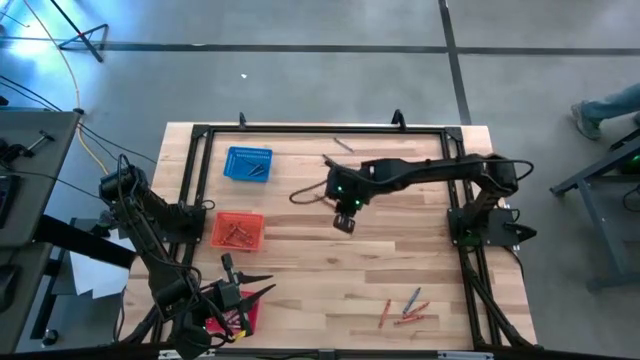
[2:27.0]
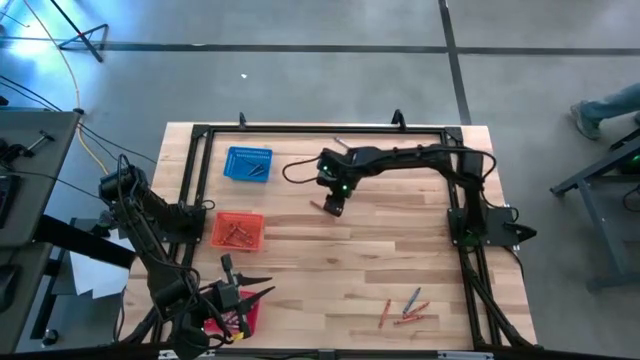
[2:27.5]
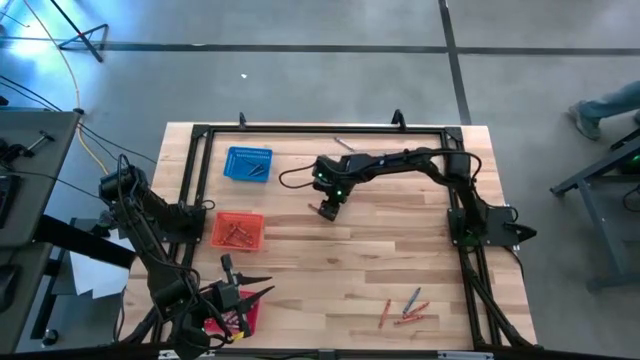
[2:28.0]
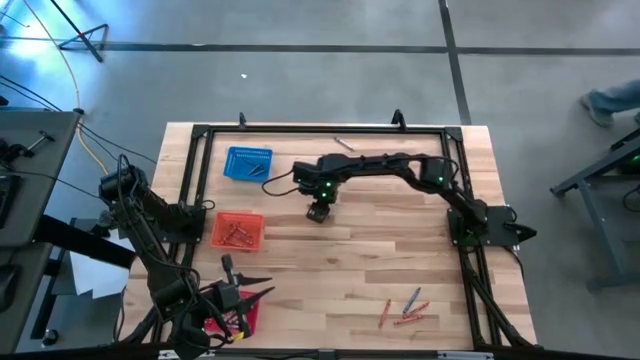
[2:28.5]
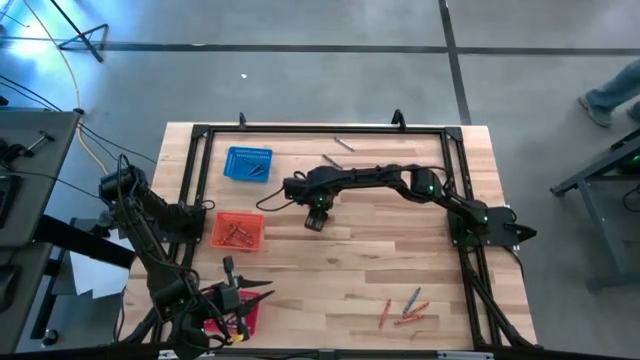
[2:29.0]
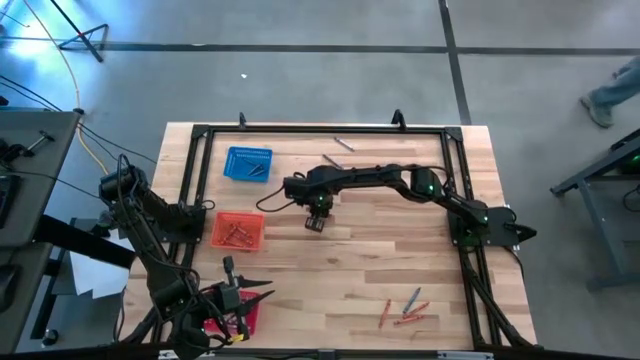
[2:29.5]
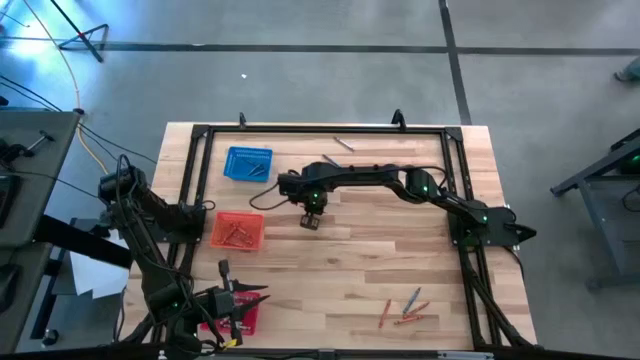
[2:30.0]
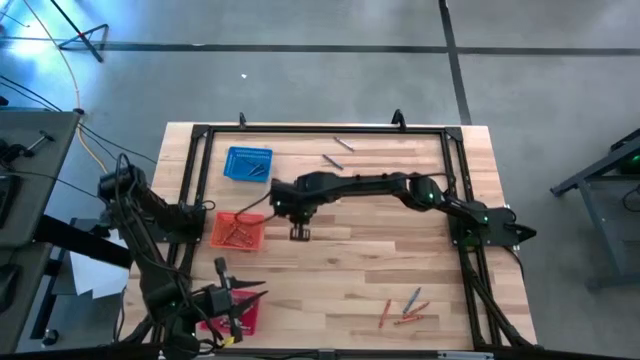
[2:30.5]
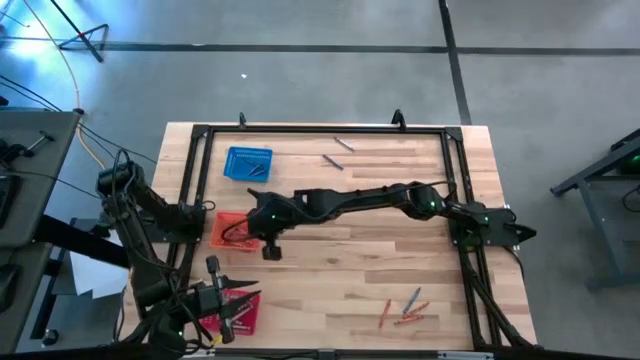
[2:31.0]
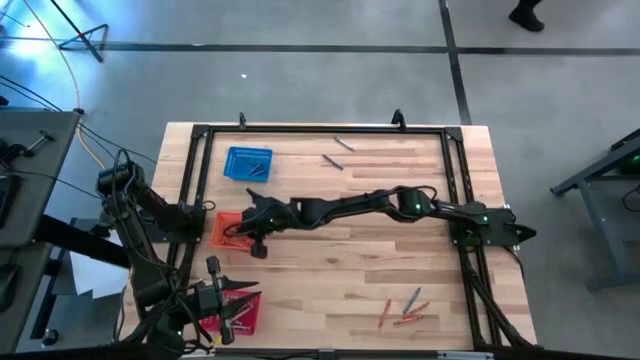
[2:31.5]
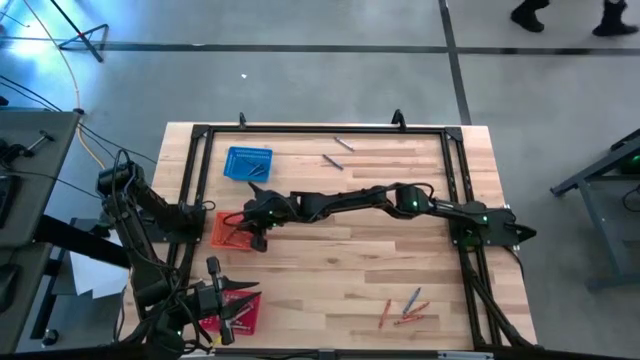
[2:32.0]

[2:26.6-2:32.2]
Task: Sort crayons
Put the orange crayon into the orange bin

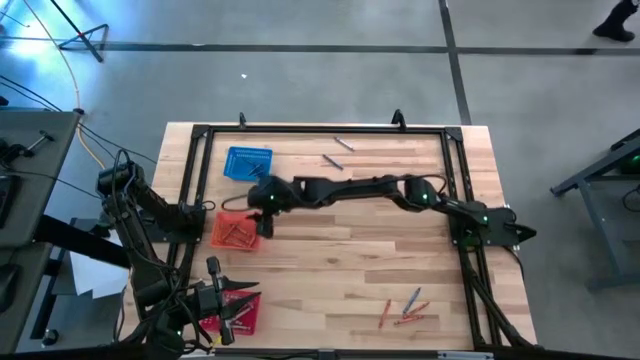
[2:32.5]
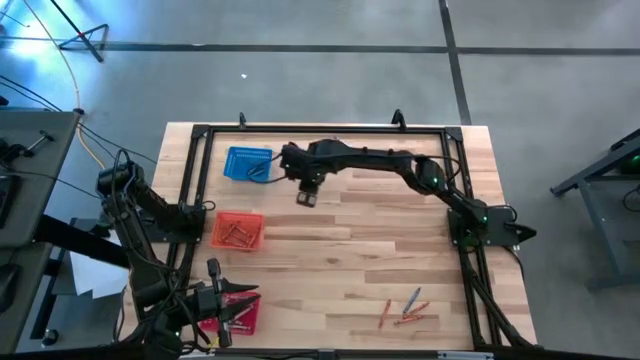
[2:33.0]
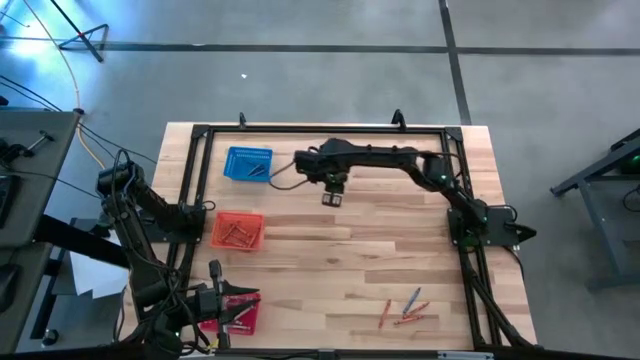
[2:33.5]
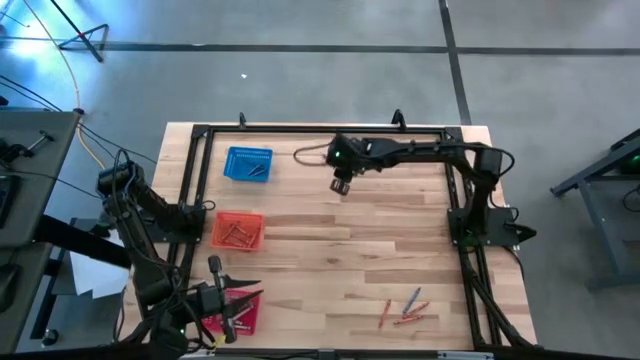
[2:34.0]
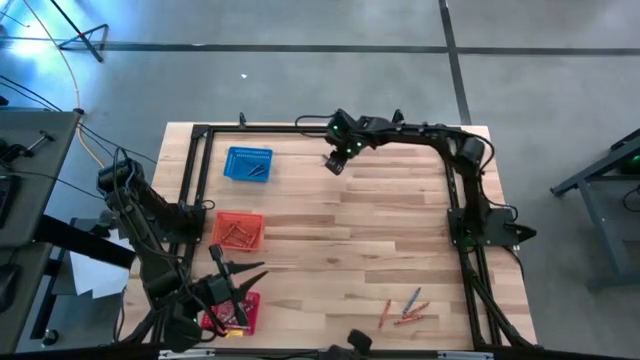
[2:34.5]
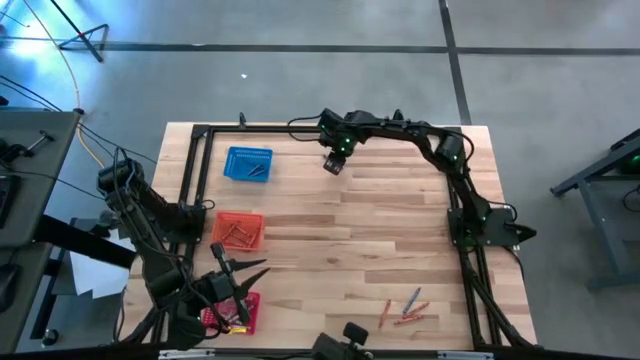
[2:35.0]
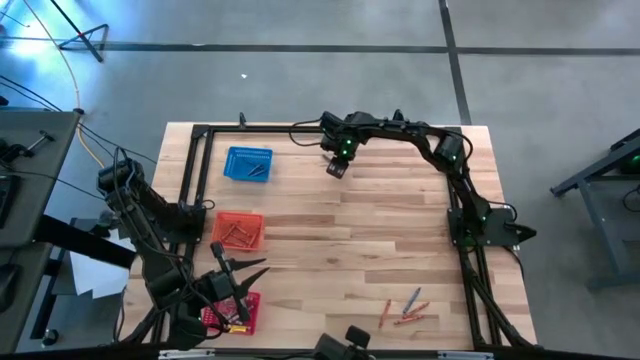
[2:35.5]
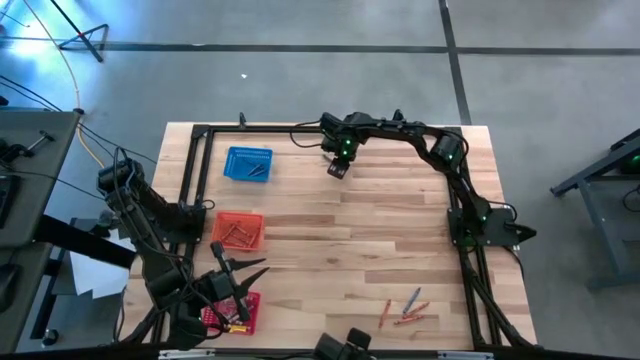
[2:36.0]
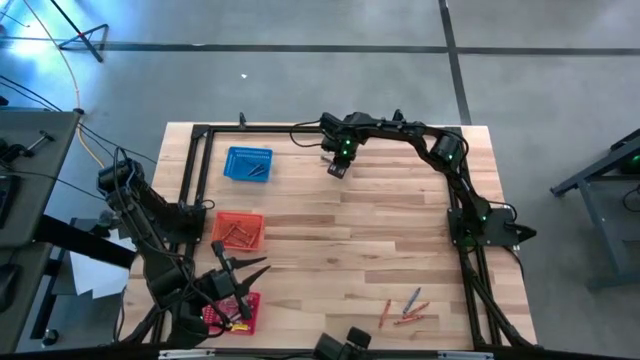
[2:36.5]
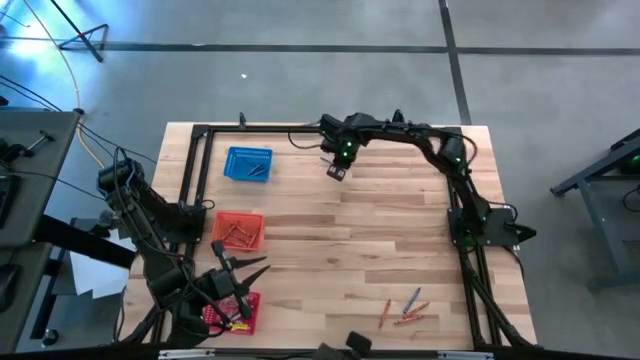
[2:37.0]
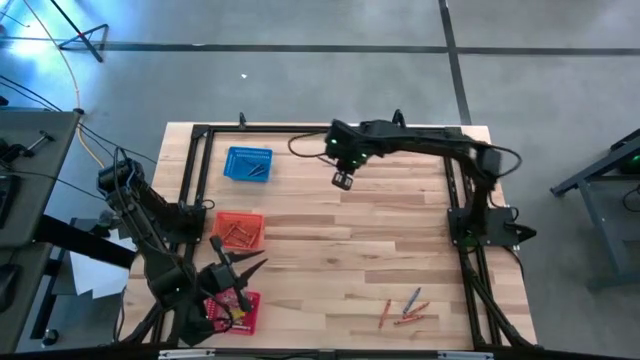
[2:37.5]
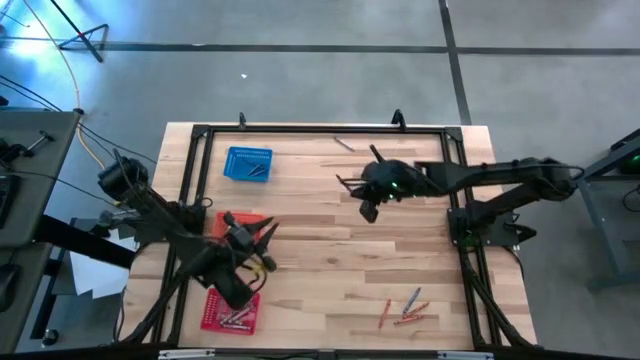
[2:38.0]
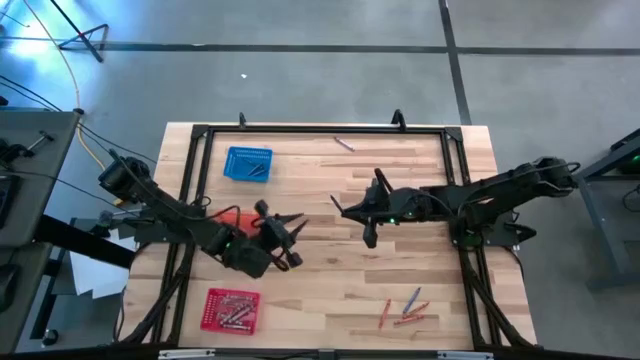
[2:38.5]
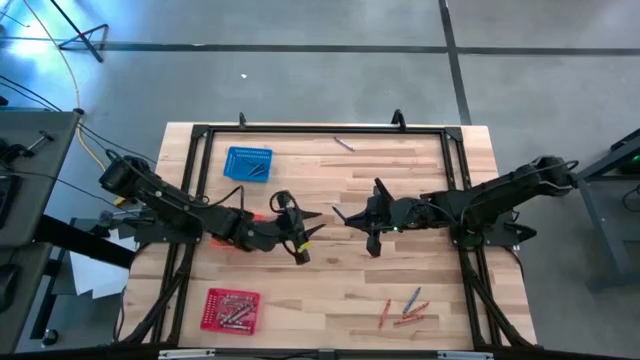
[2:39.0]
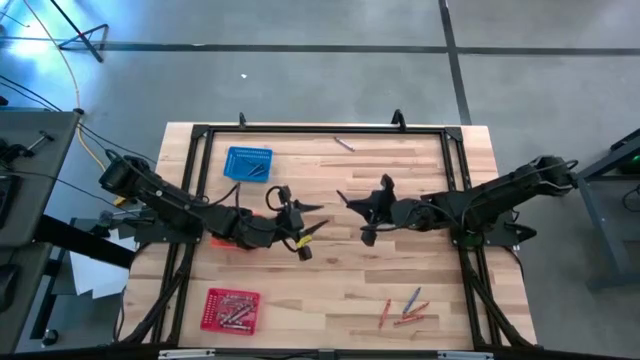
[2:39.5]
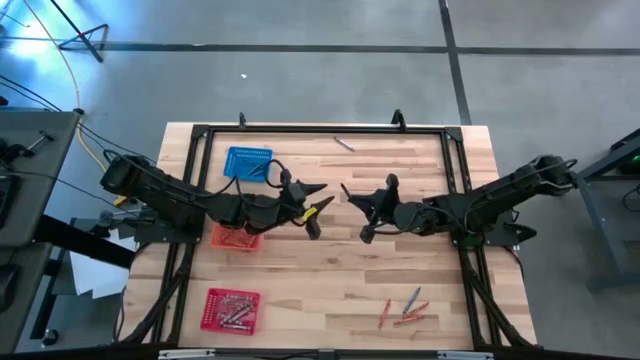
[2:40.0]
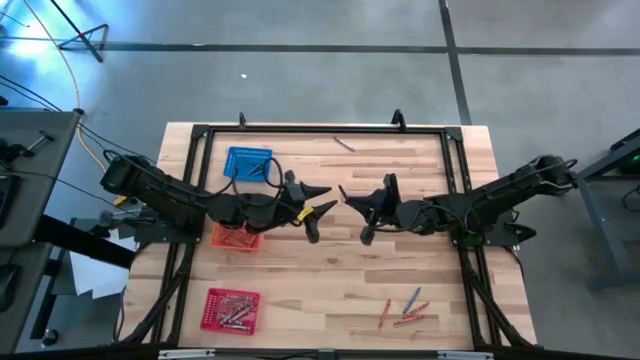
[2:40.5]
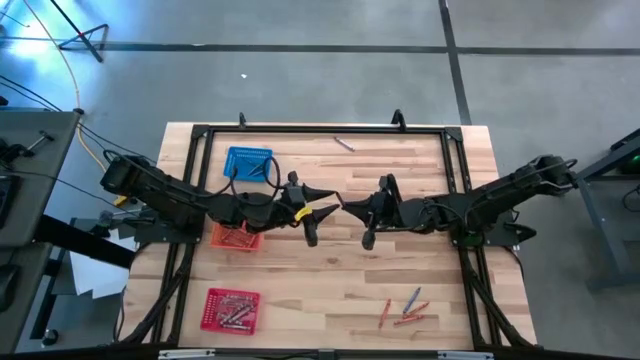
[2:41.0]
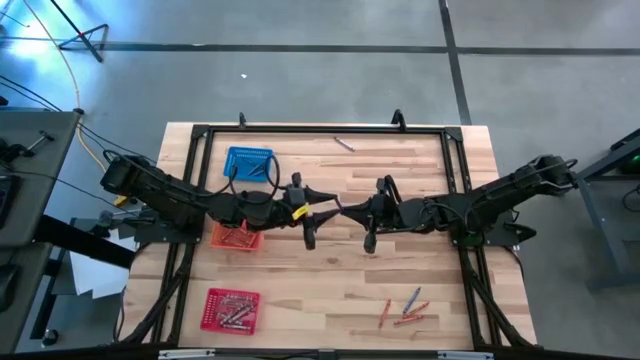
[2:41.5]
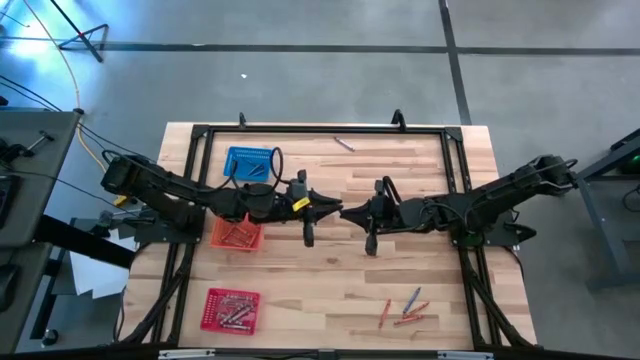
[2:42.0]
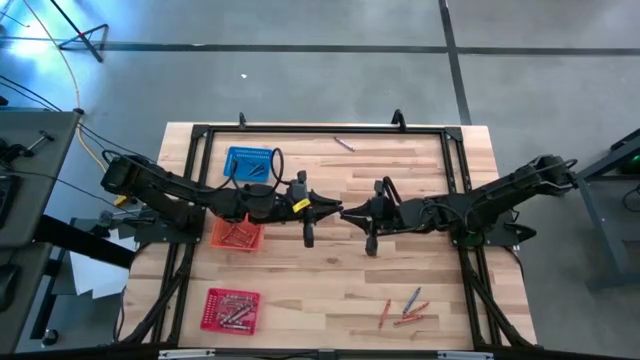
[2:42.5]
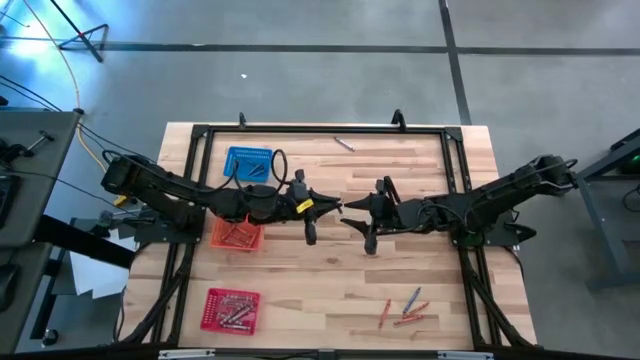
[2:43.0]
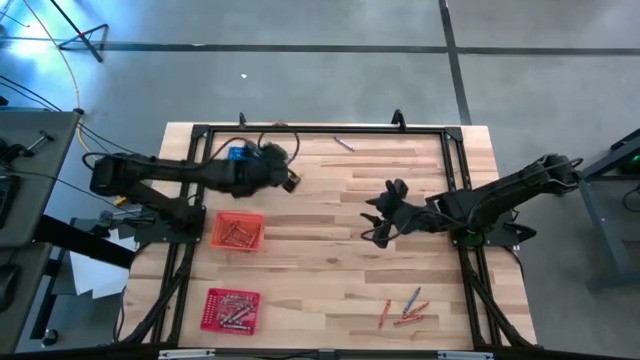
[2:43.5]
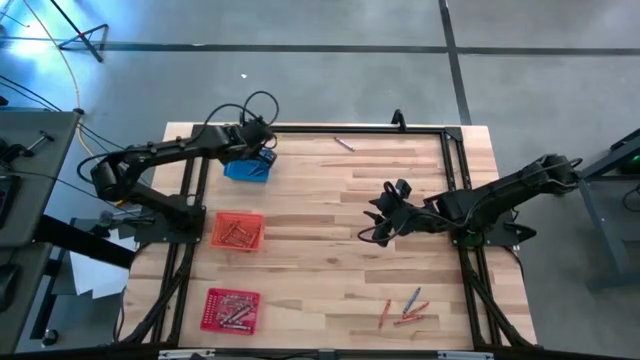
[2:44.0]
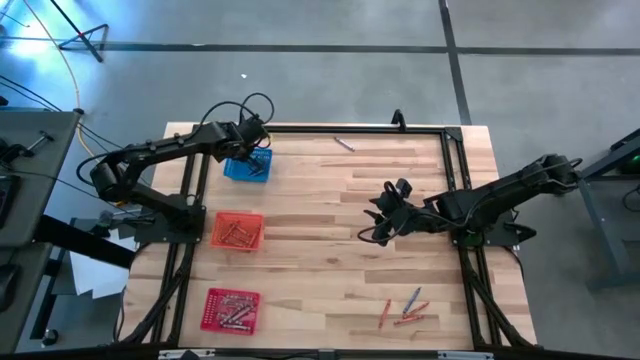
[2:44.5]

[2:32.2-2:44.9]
Put the blue crayon into the blue bin

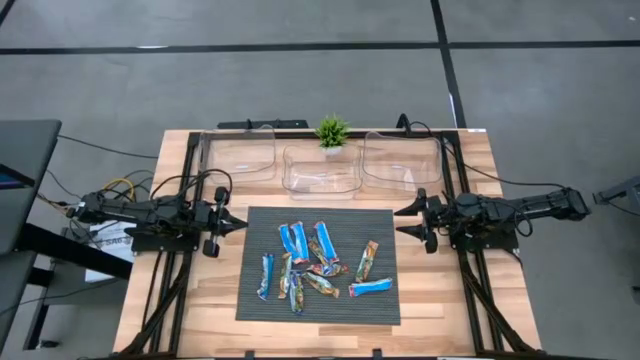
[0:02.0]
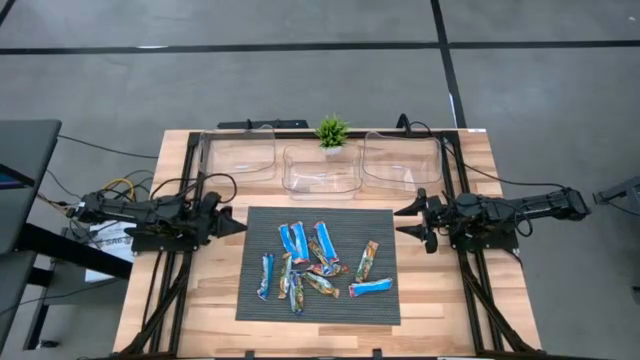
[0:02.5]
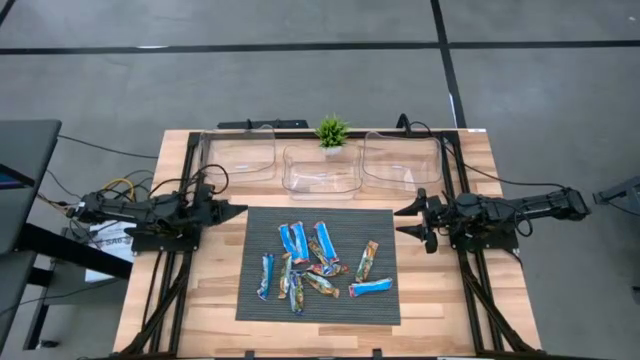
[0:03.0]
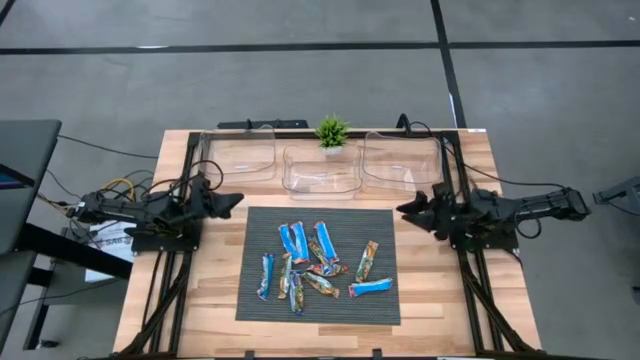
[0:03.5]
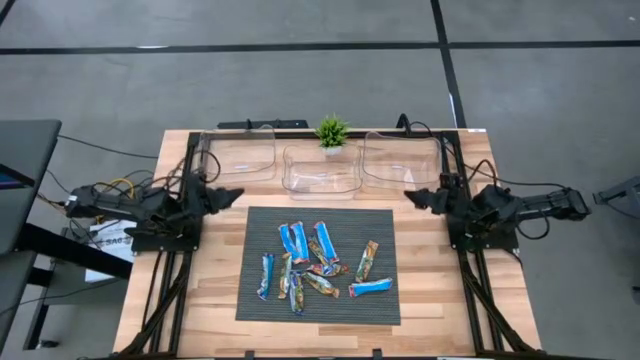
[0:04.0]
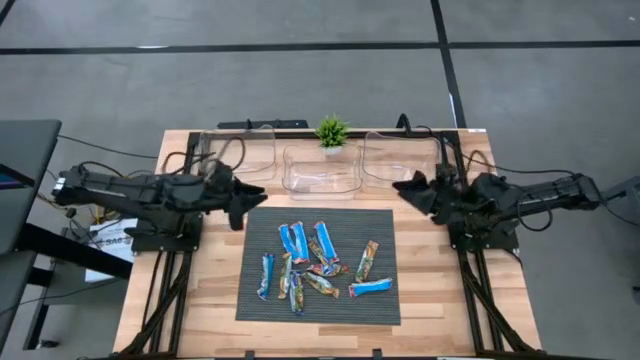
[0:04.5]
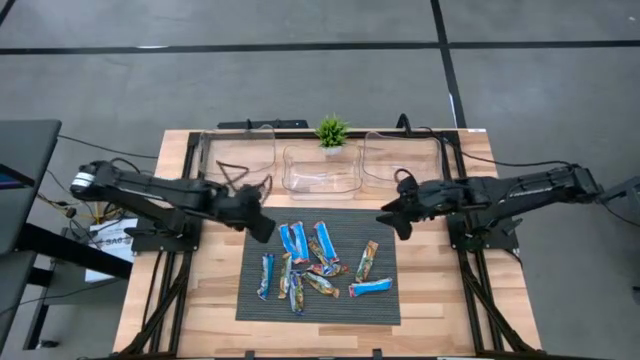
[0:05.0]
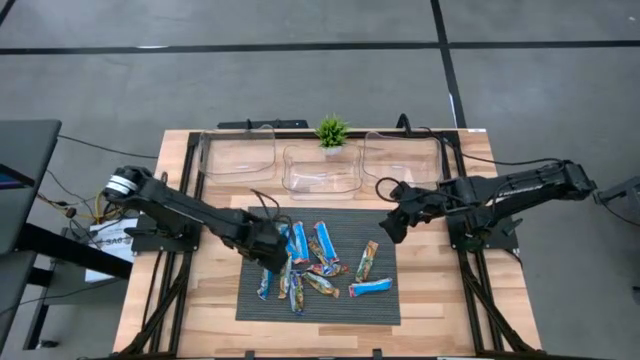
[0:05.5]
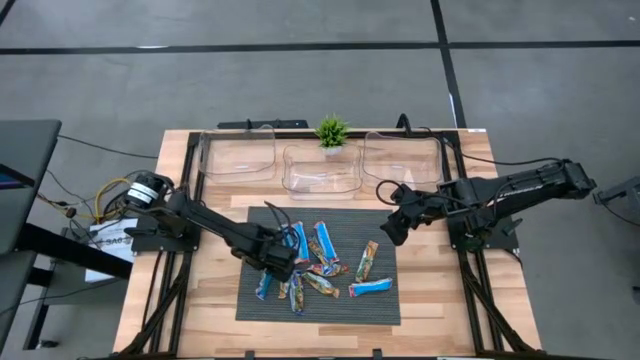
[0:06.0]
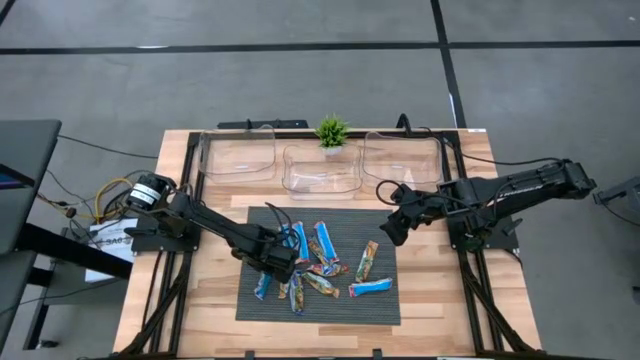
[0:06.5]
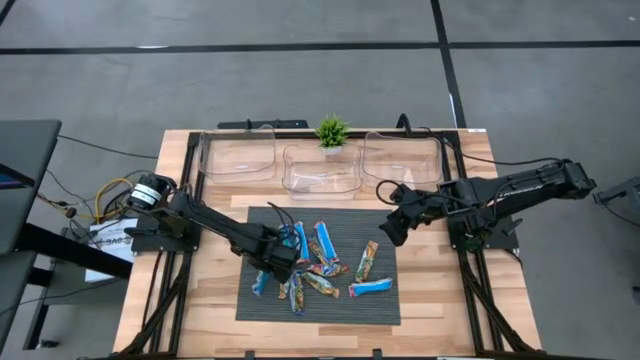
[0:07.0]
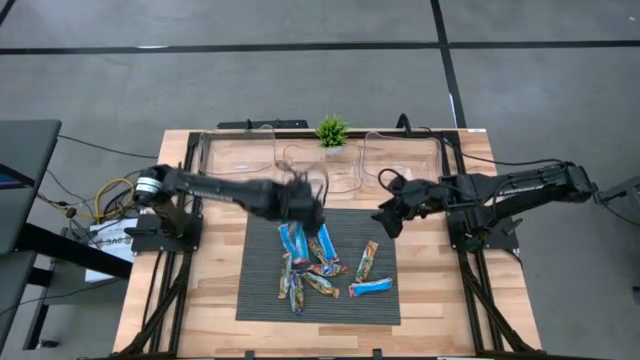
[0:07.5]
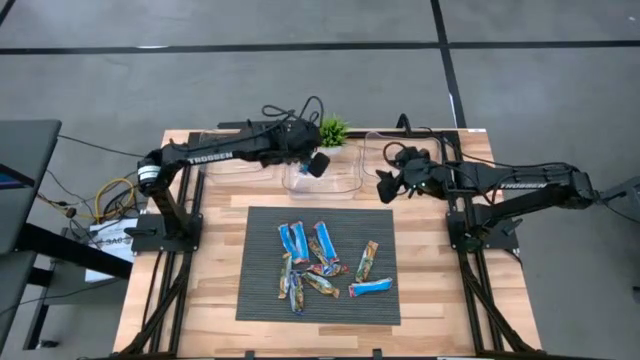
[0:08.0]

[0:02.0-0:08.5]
Task: Pick and place Granola Bars by type
Put the blue granola bar into the middle transparent bin
